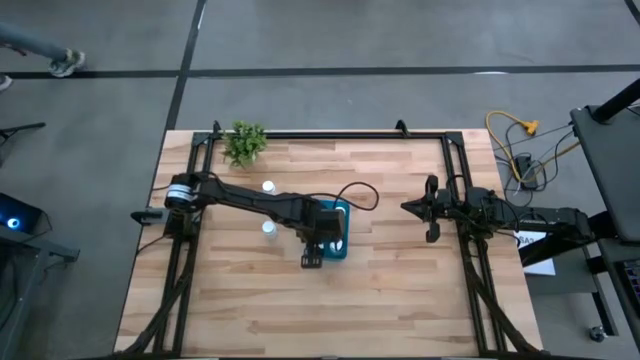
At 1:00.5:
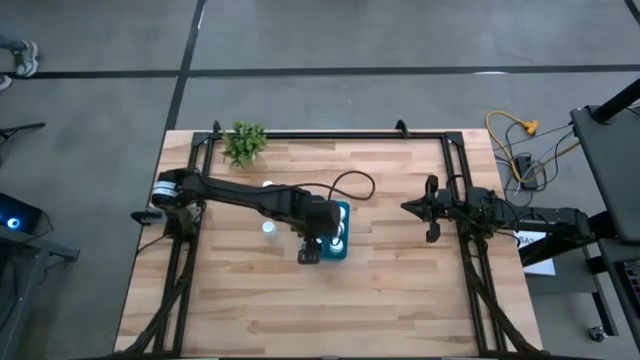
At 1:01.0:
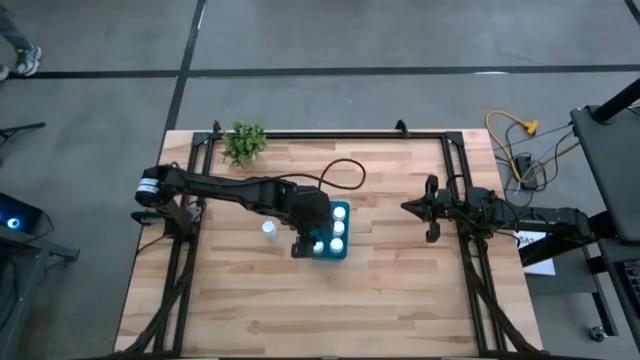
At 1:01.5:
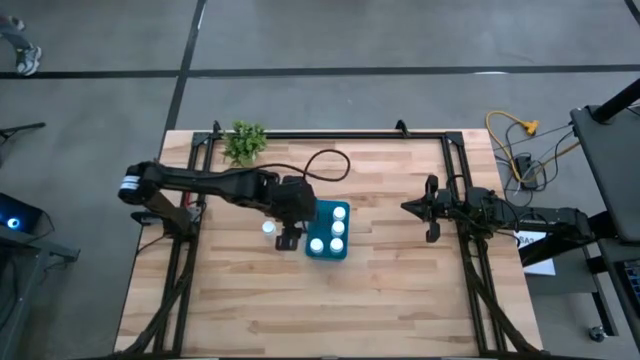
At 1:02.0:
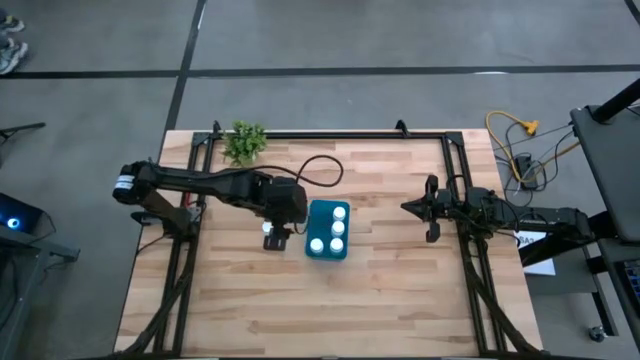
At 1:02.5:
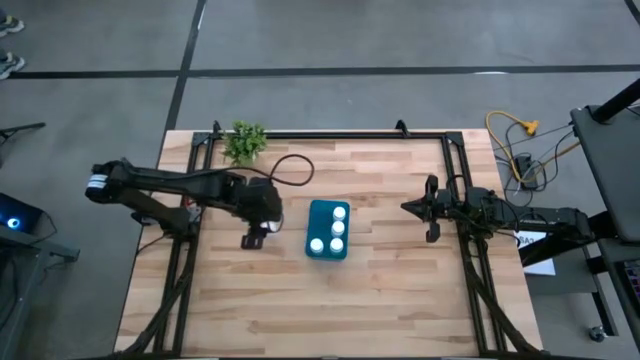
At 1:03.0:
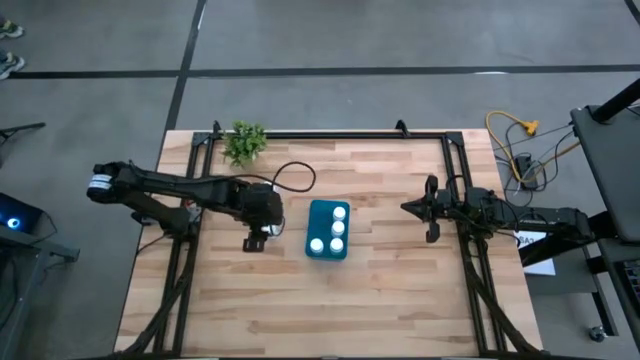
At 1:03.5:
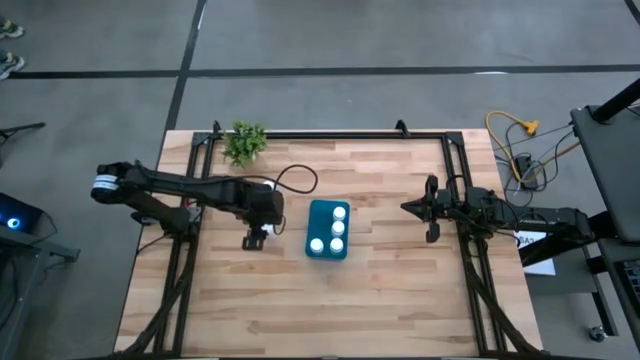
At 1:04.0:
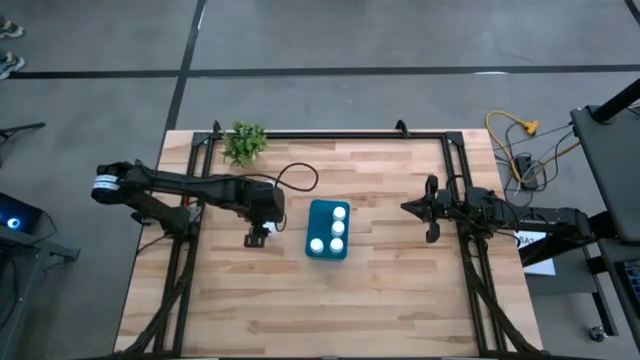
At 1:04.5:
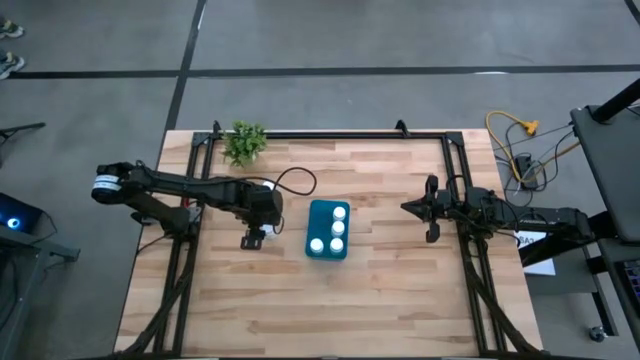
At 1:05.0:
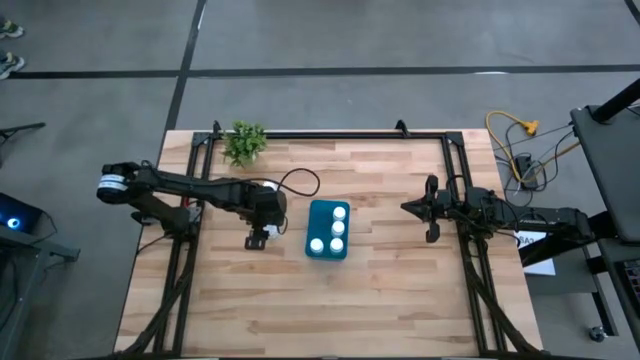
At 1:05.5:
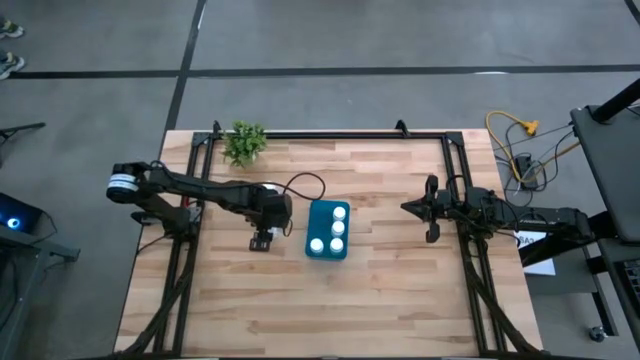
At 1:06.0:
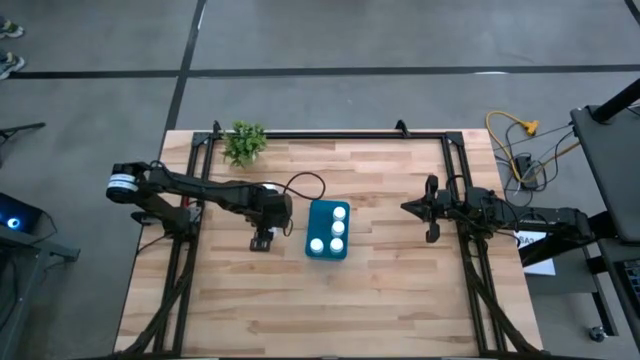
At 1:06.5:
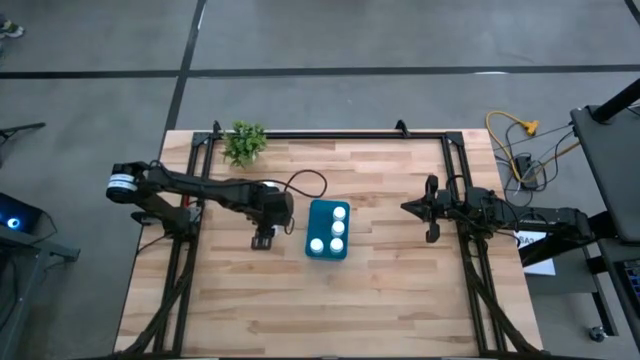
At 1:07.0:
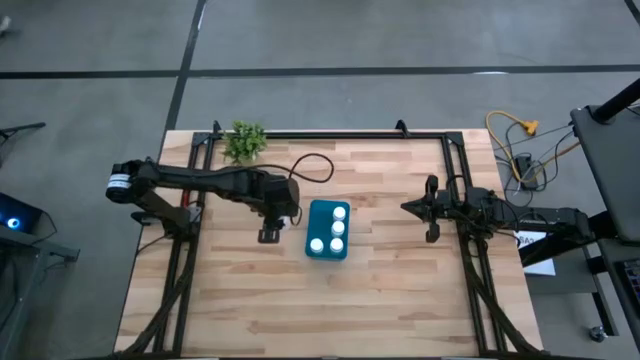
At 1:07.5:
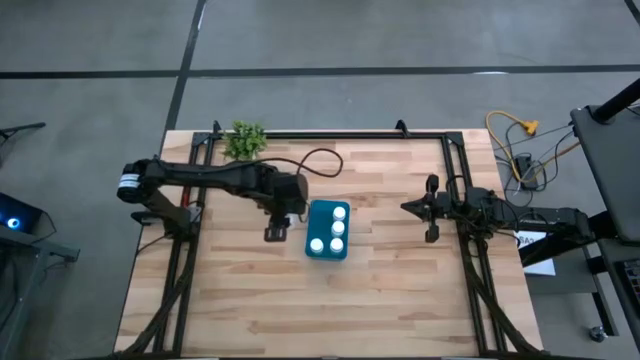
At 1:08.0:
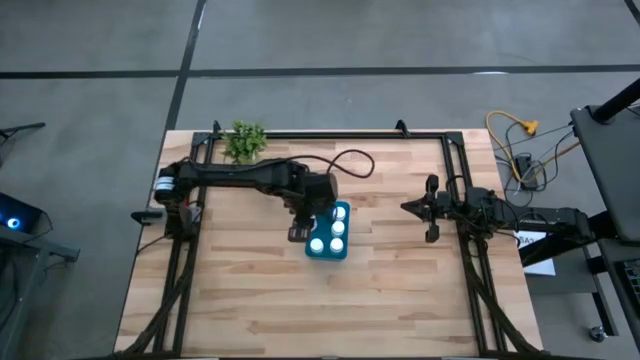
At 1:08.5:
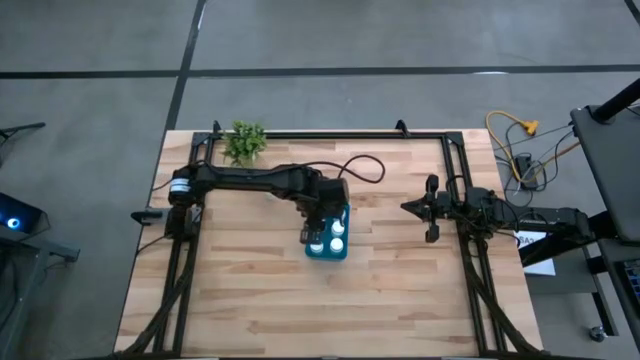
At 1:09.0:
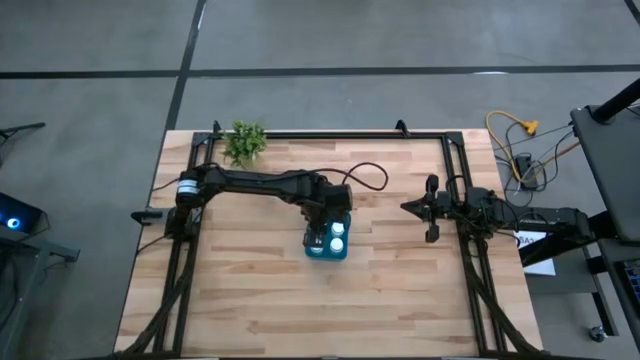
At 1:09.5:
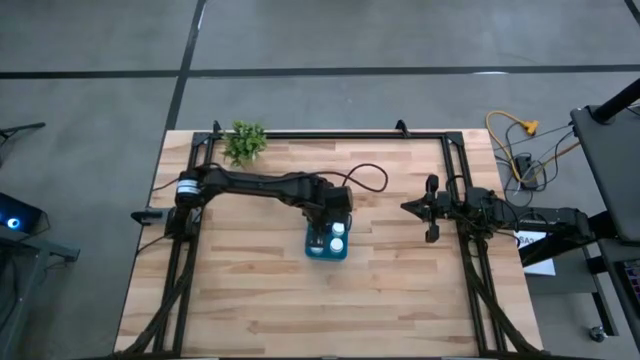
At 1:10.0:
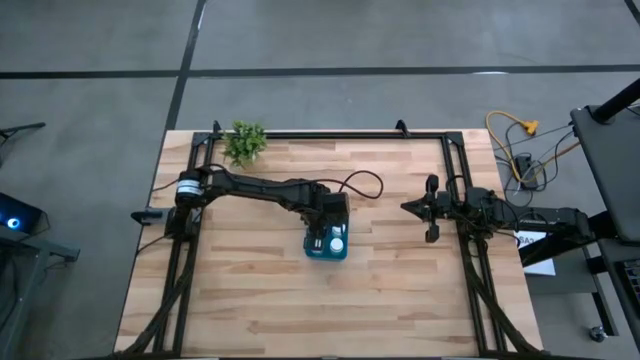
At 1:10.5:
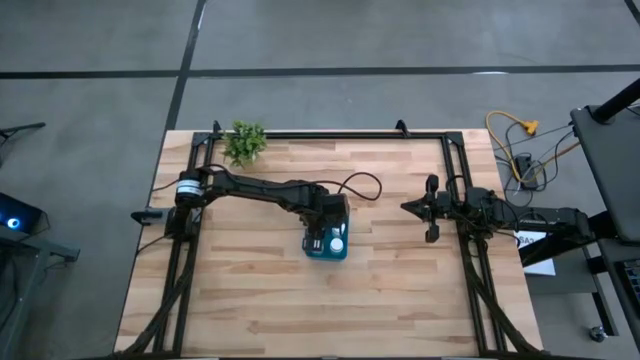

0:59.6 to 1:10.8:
Task: Pick and place pill bottles into a basket
Put the white pill bottle into the blue container

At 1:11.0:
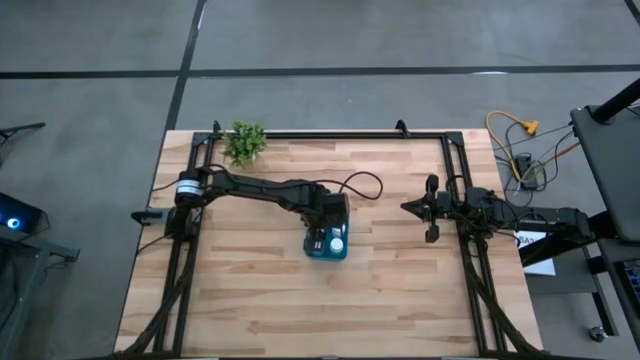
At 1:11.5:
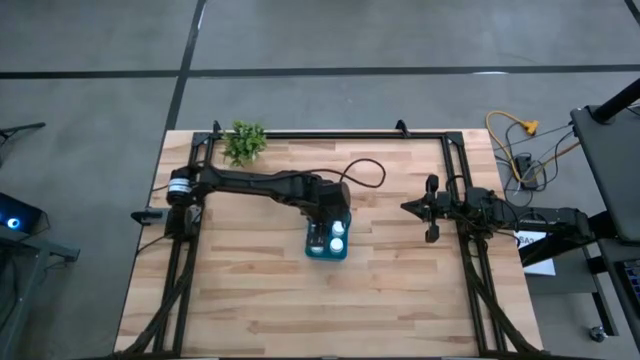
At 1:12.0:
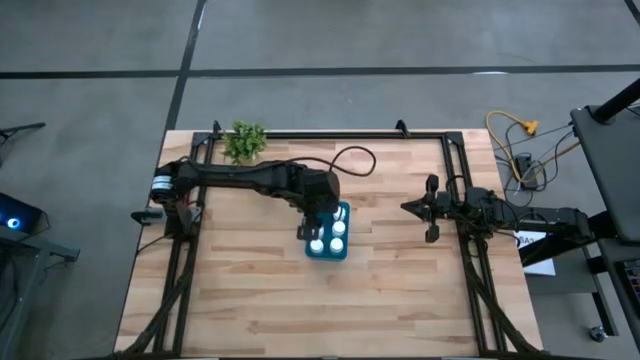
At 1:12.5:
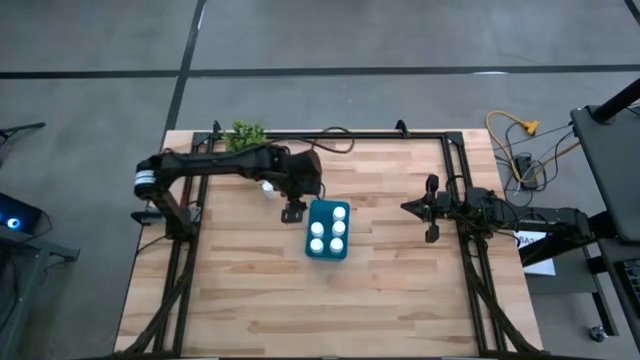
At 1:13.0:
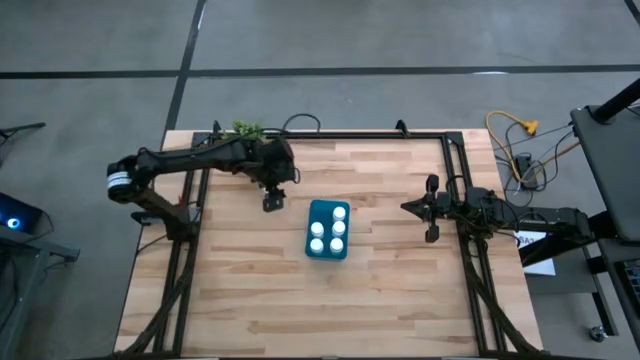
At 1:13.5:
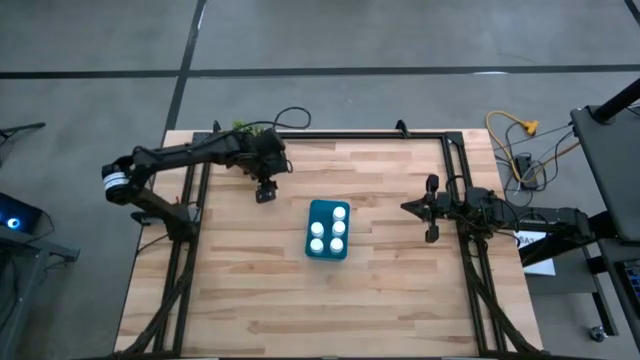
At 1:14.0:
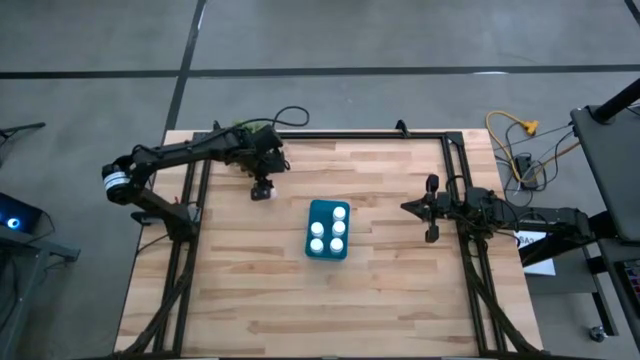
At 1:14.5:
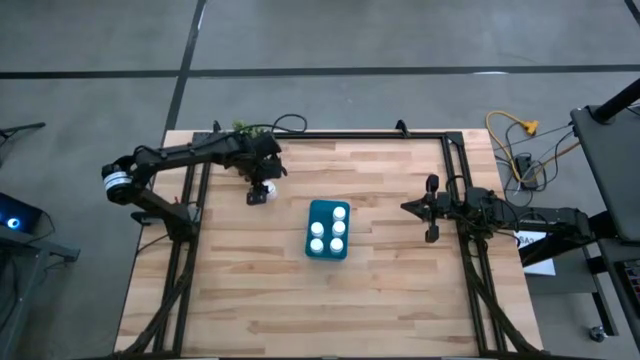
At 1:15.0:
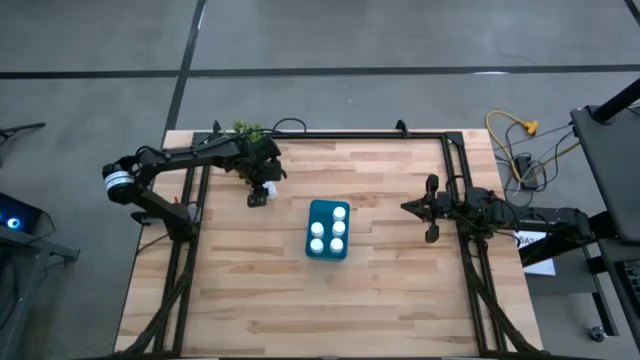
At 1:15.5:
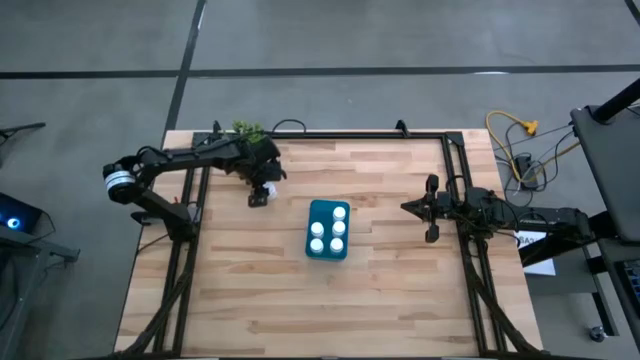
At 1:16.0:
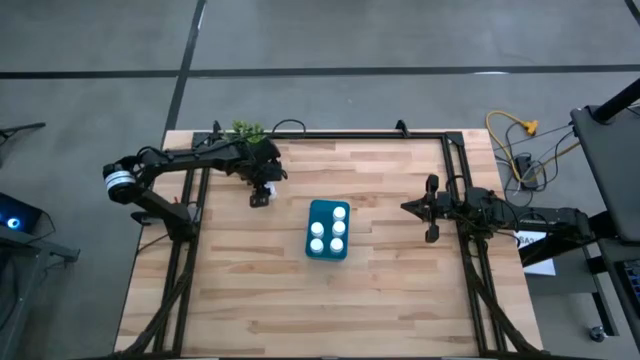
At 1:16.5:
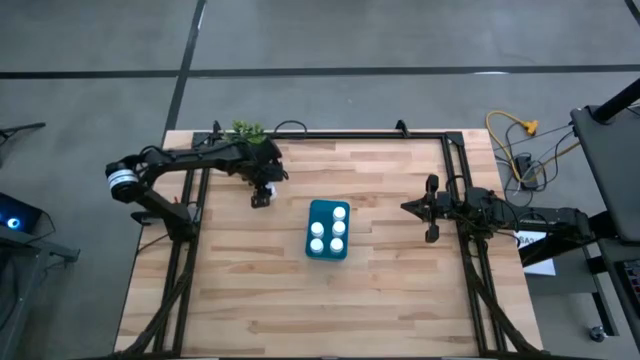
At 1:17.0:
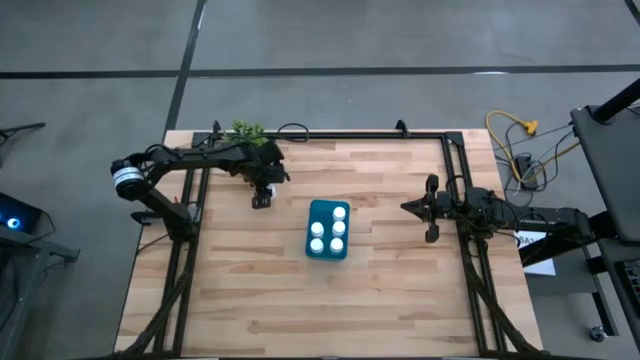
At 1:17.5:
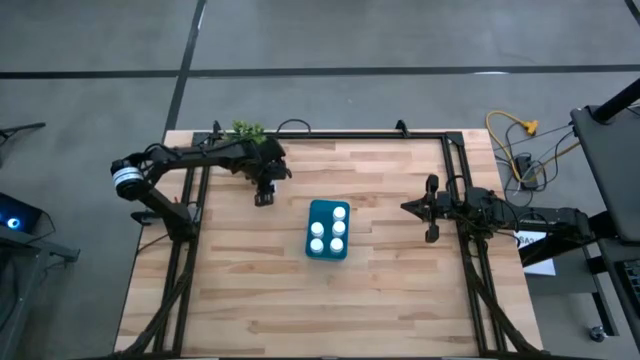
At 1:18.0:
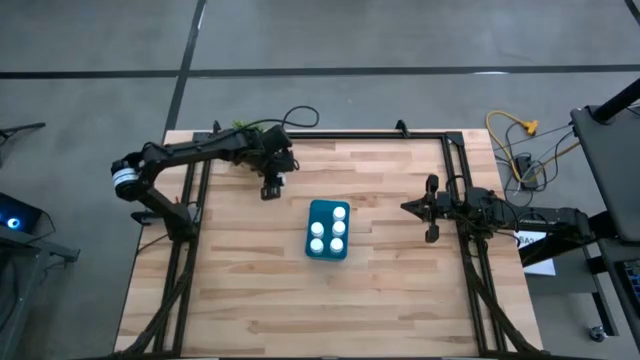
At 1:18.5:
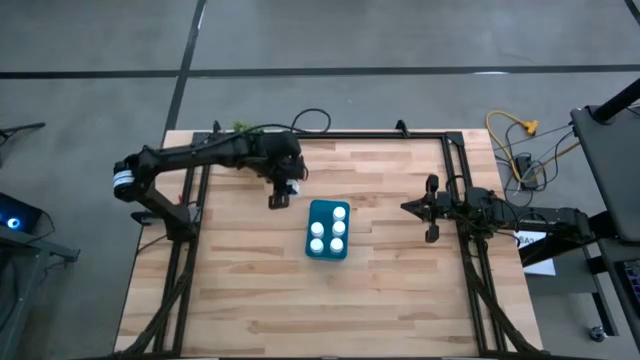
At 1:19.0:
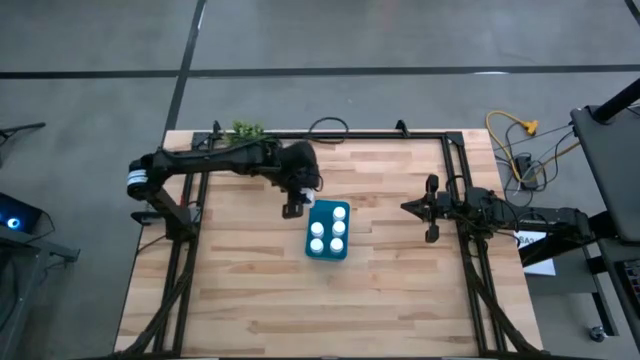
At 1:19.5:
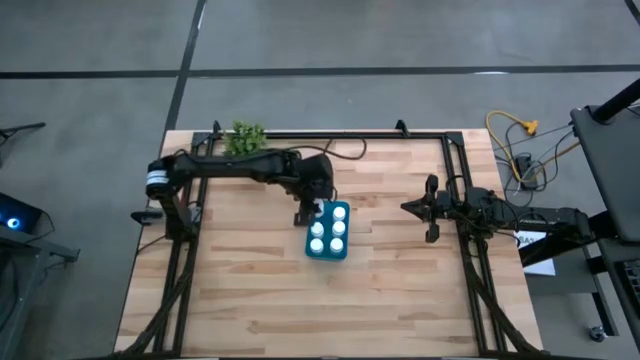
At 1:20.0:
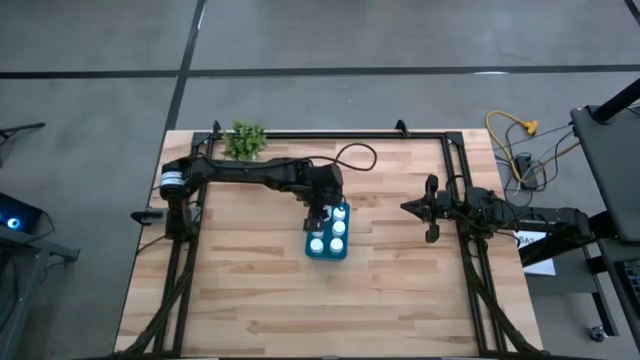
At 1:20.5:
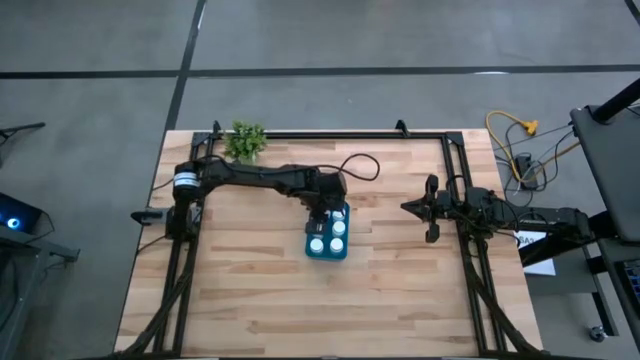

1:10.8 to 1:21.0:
Put the white pill bottle into the blue container
